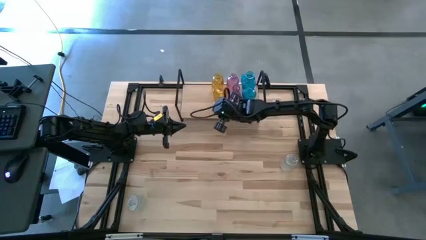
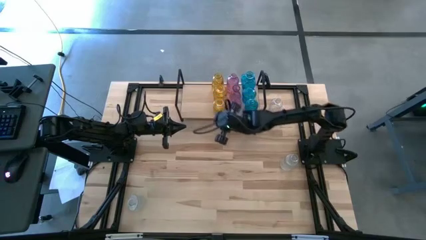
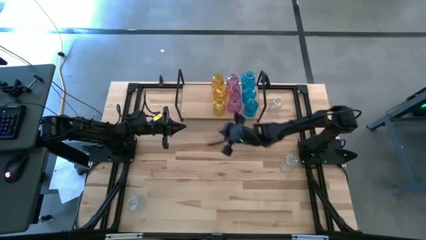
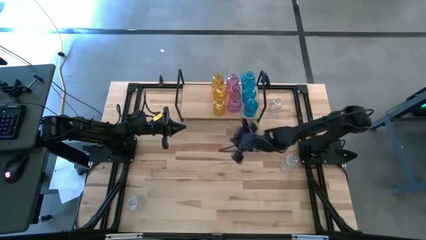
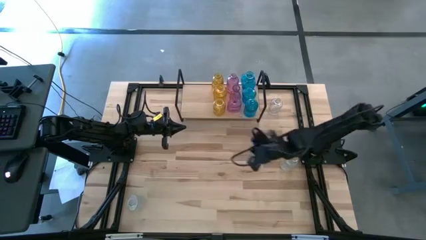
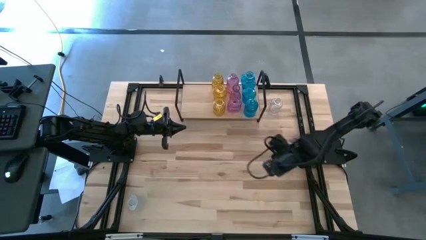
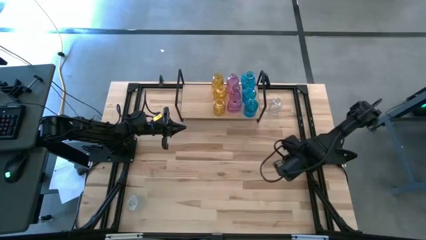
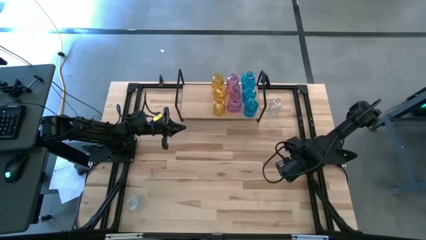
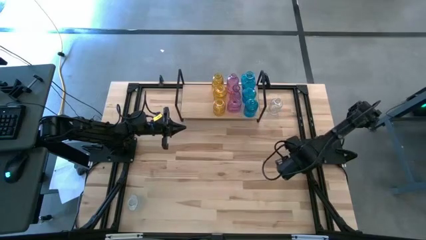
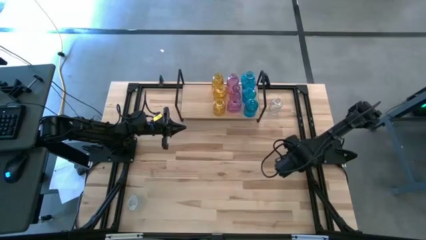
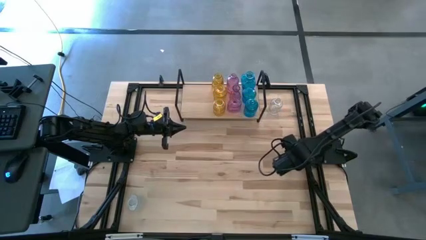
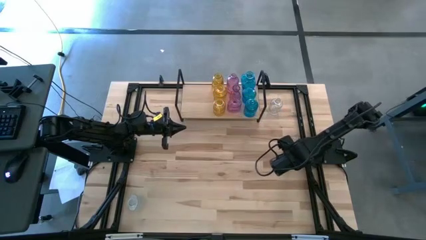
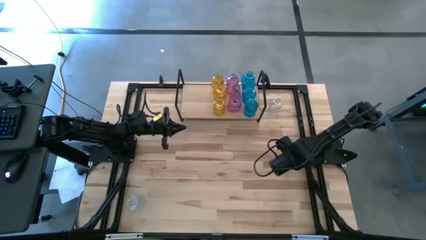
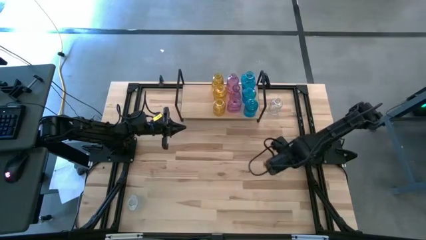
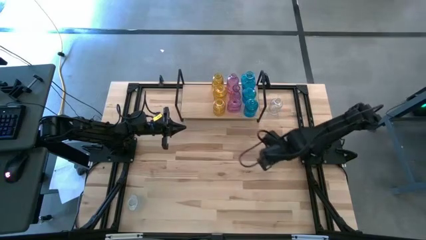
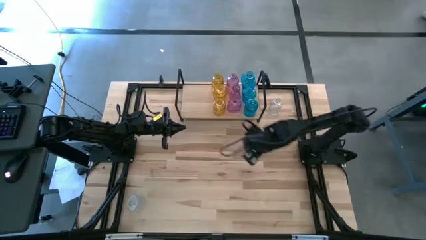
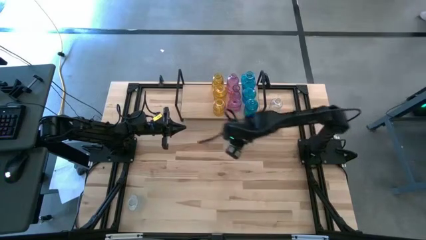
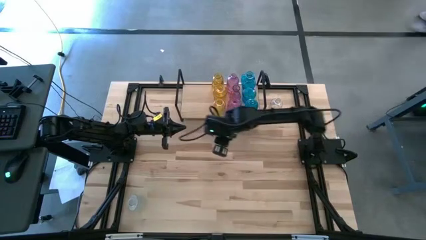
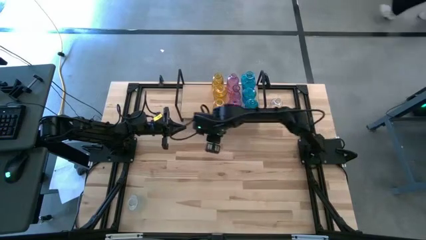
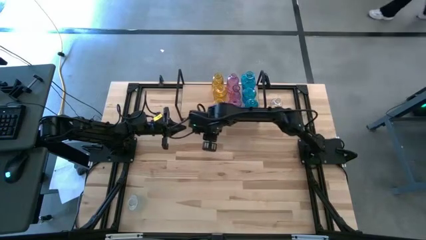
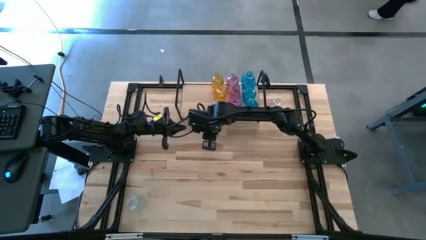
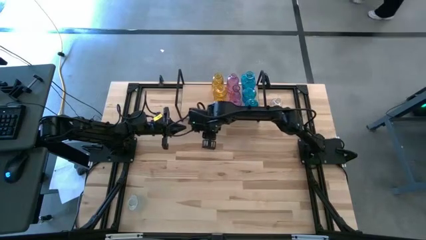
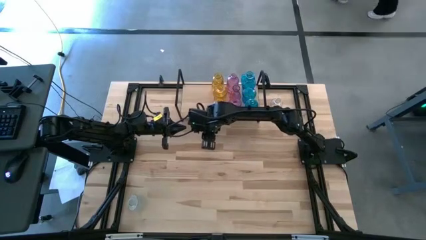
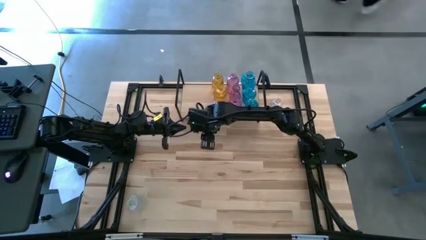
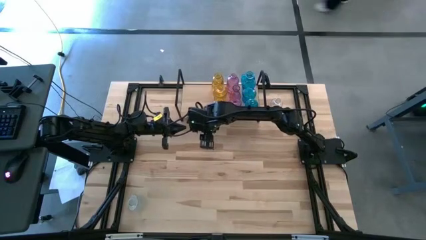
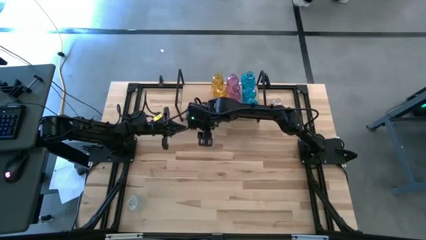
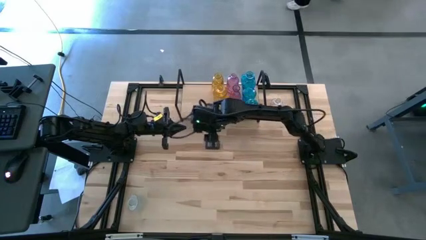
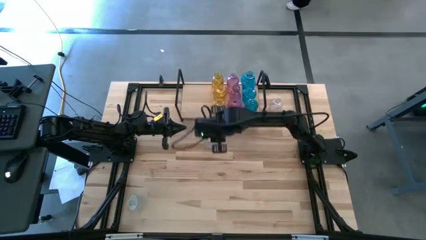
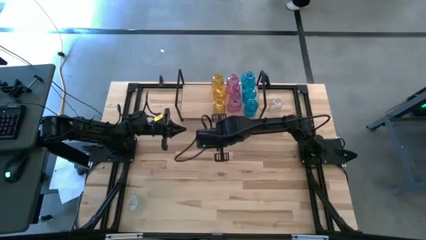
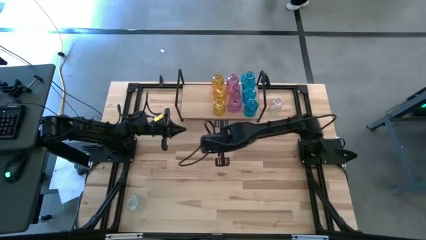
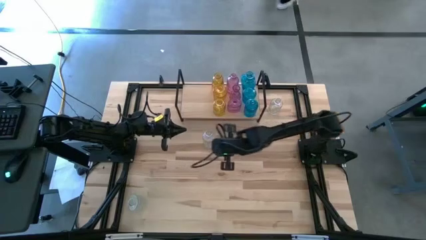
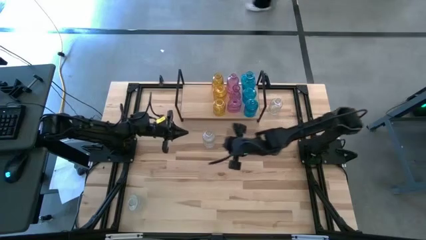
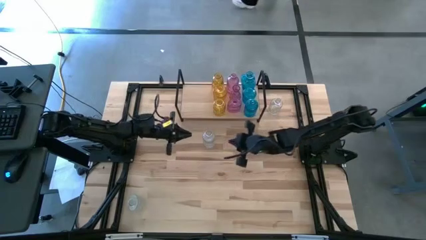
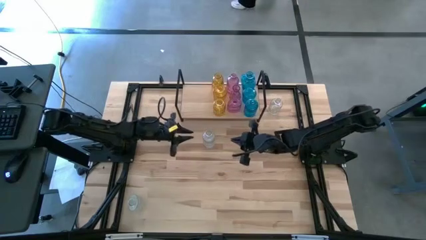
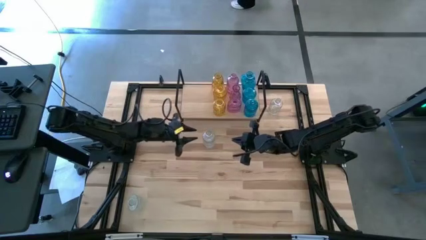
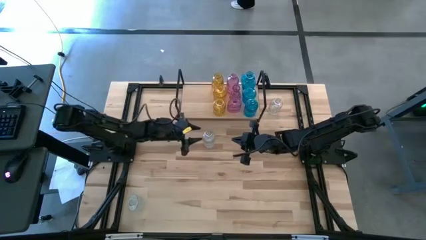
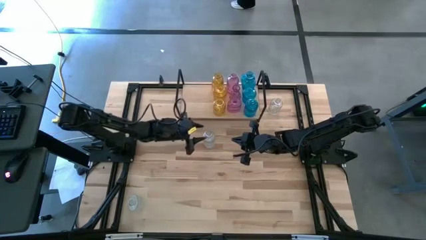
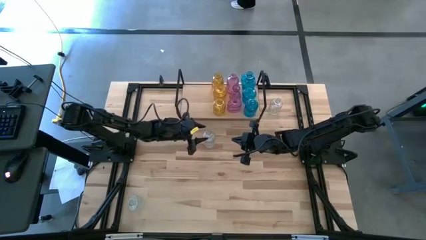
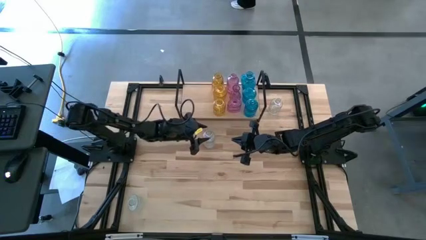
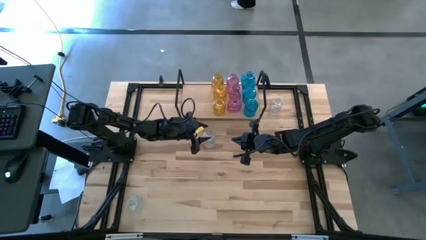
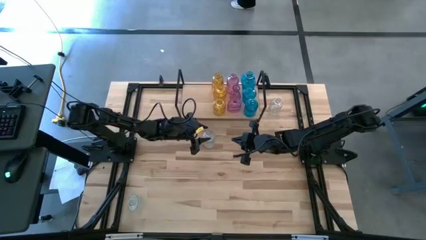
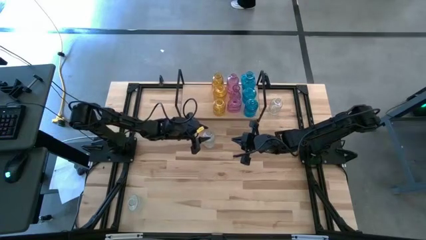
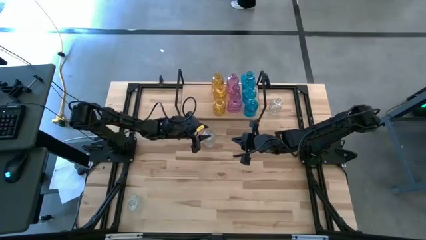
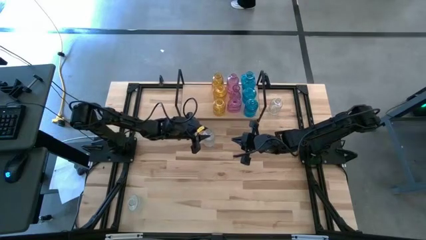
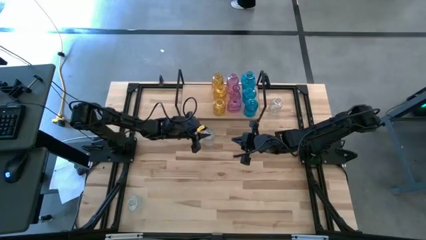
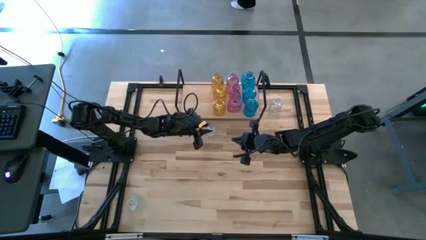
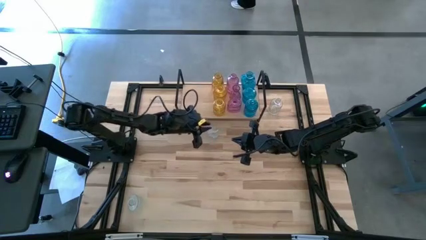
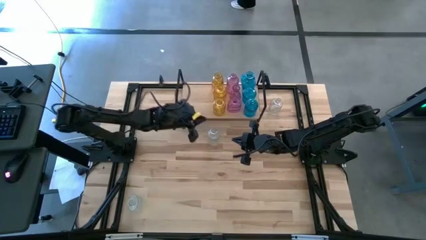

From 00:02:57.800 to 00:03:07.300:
Task: sort vases onto shelf
Put the middle transparent vase on the shelf

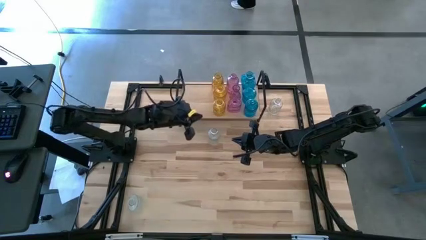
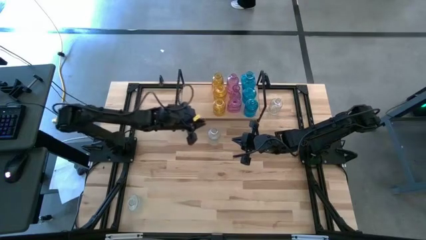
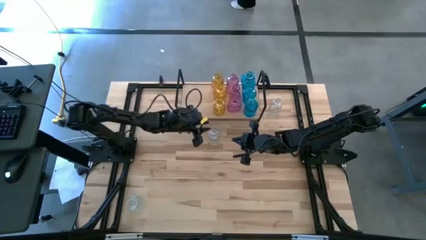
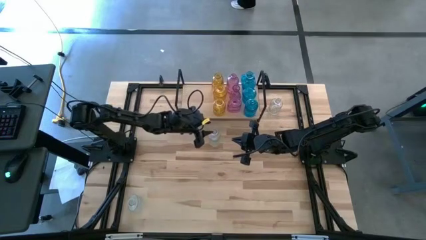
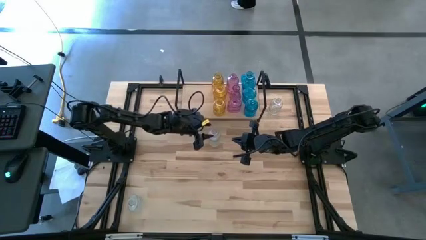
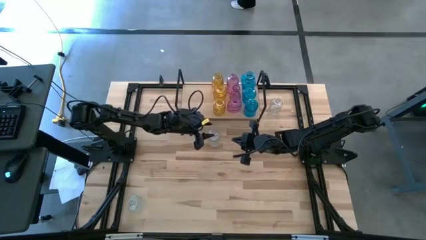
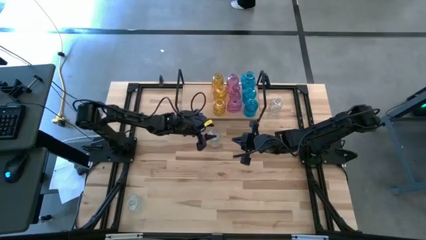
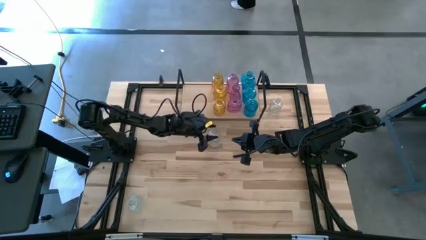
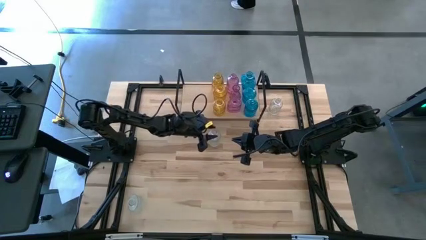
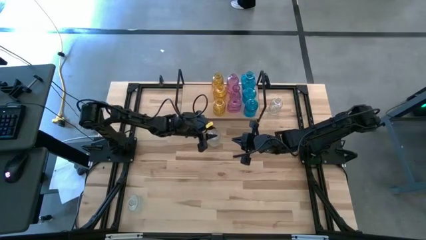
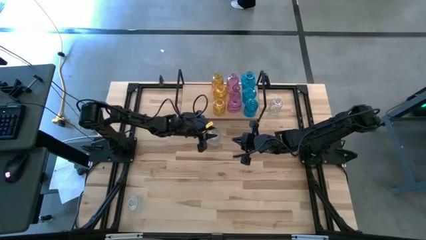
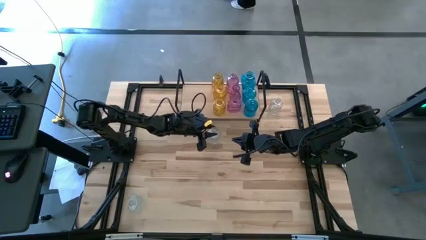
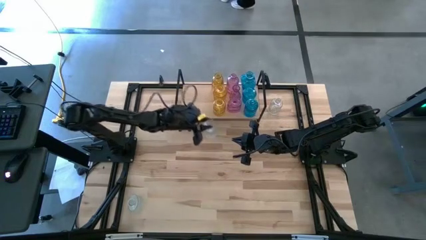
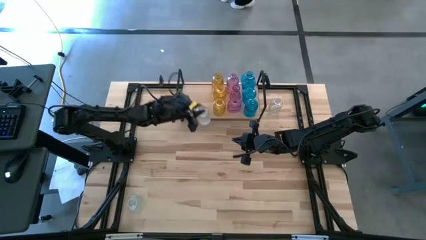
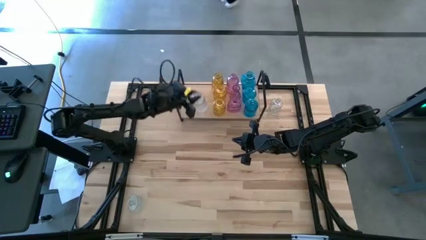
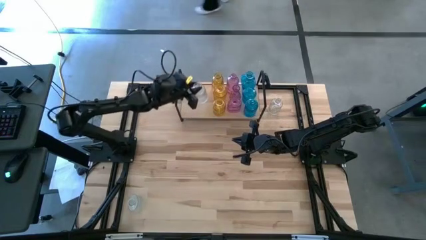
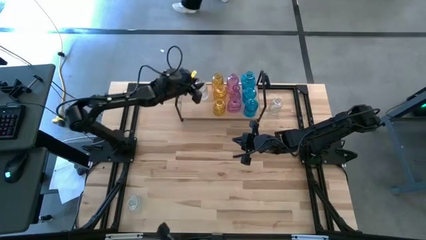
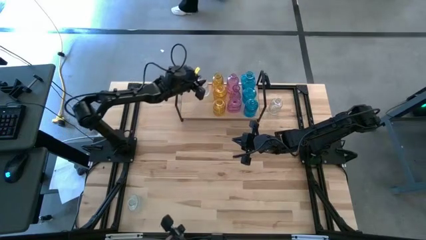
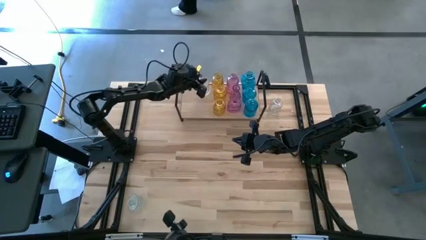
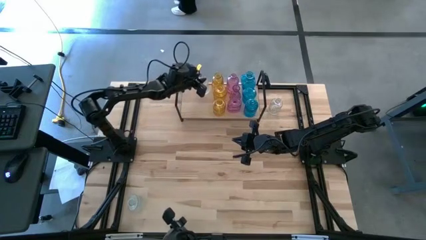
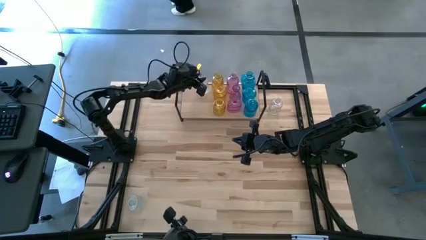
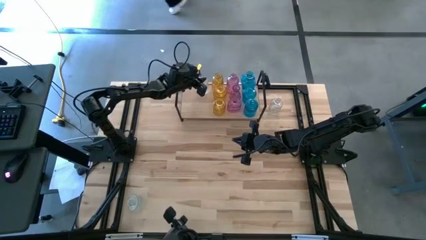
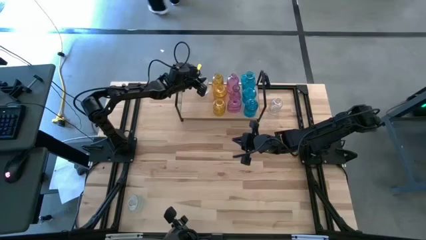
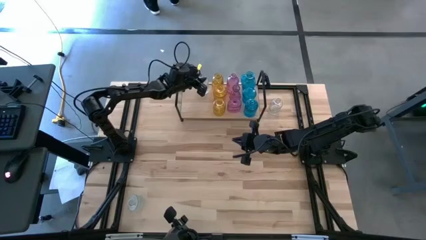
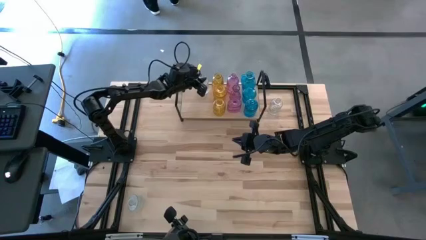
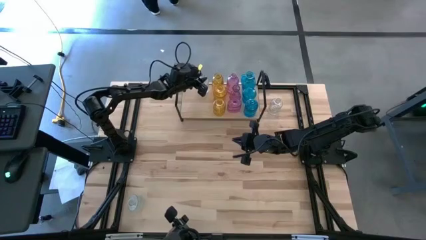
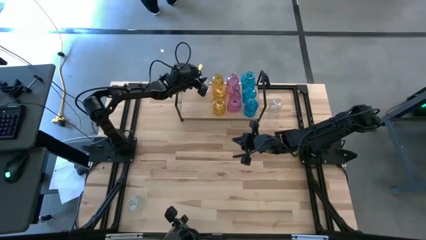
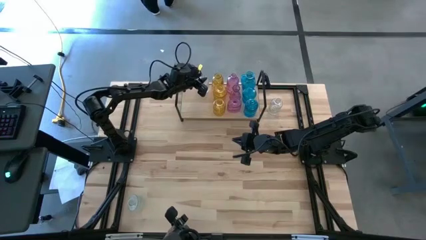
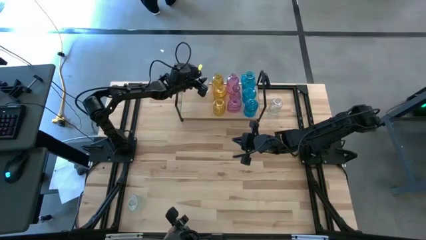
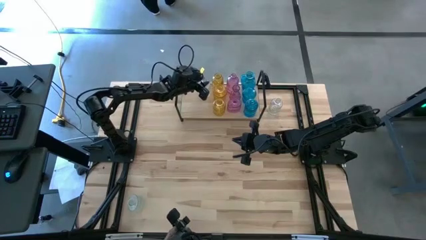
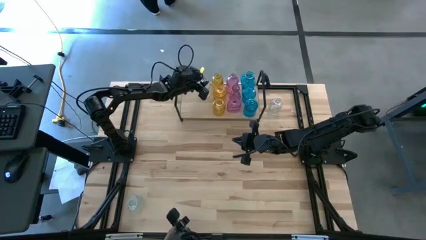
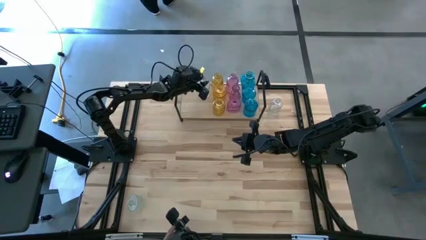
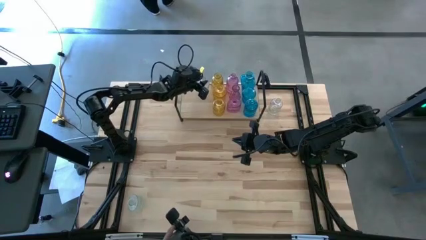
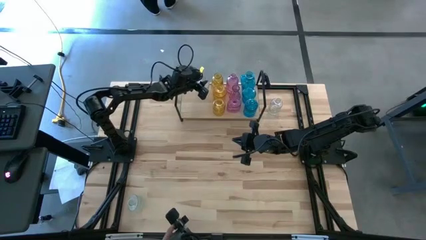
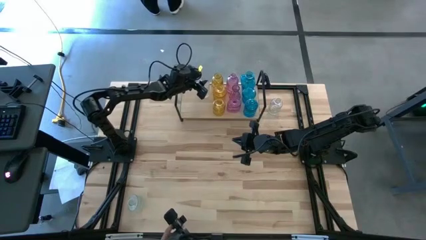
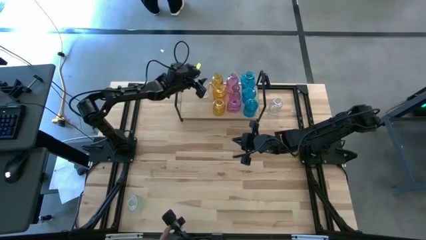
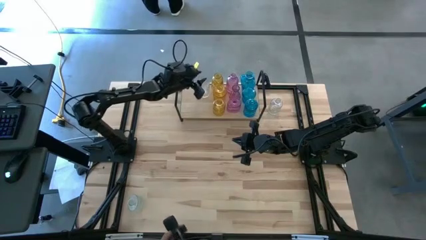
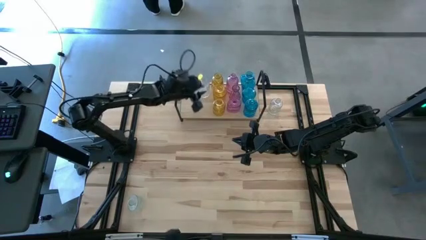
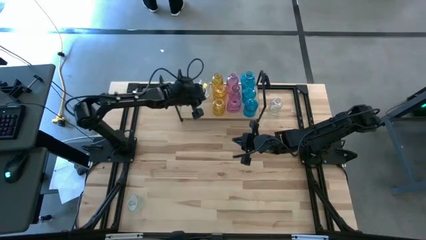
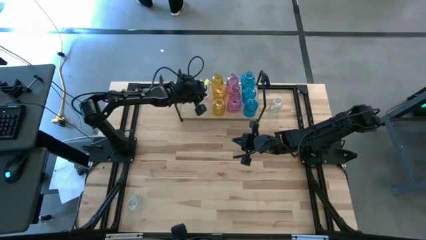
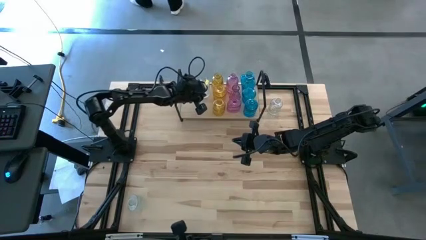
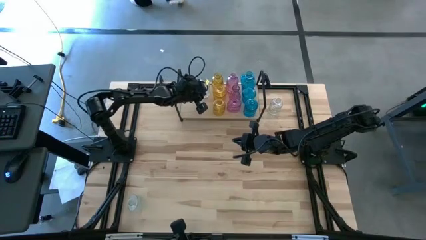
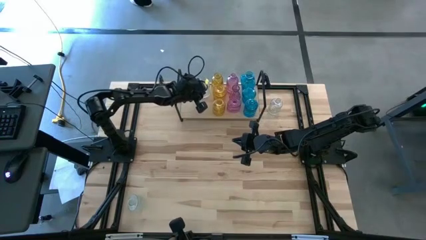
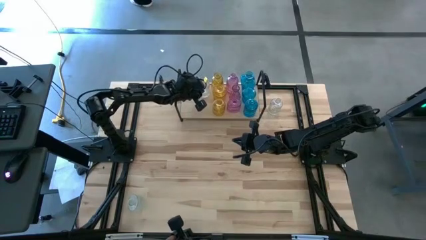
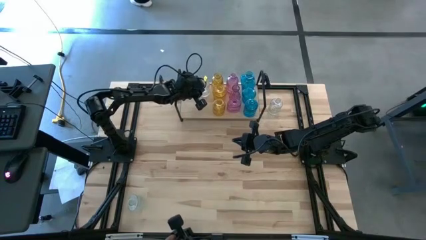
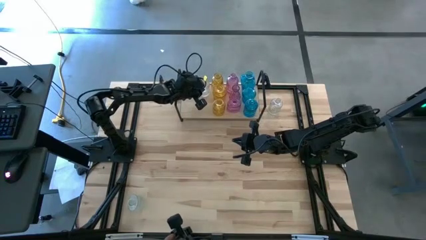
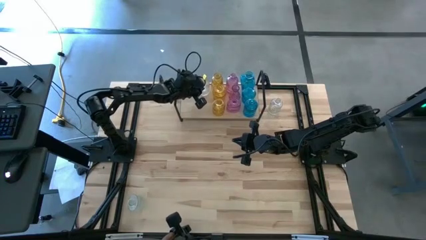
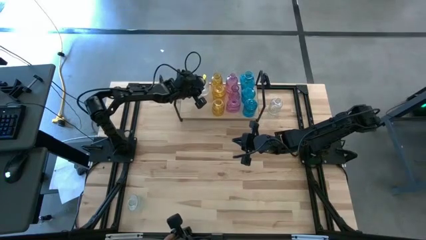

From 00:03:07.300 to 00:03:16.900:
Put the middle transparent vase on the shelf
